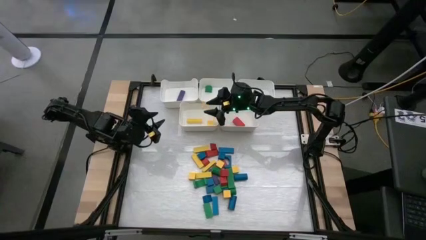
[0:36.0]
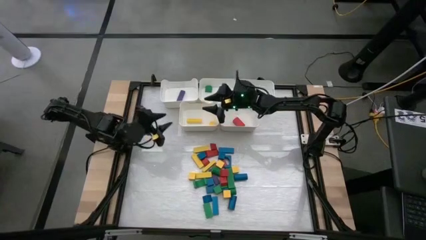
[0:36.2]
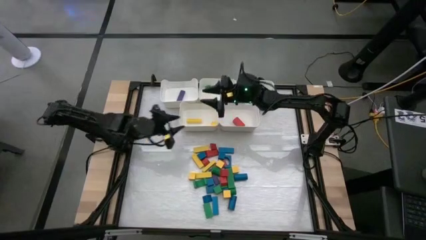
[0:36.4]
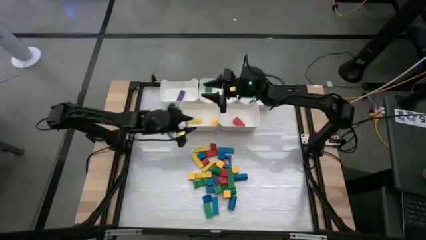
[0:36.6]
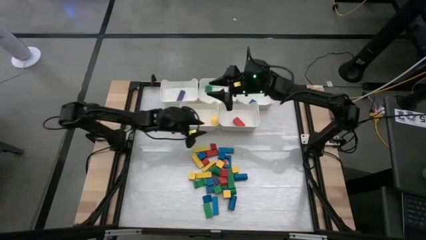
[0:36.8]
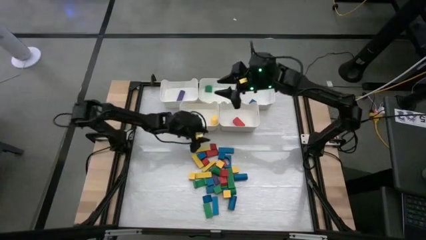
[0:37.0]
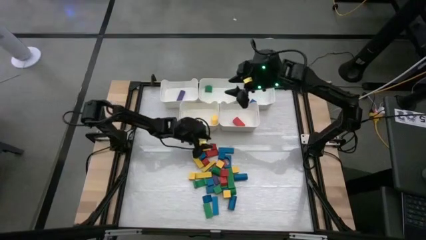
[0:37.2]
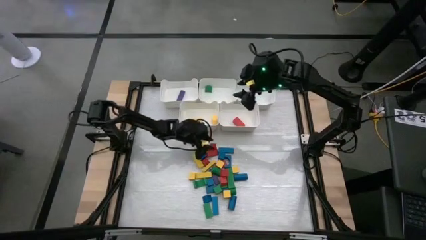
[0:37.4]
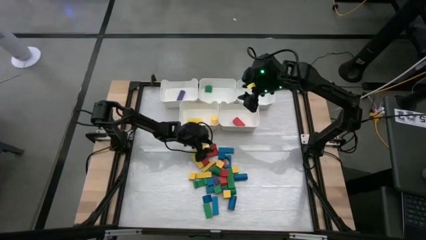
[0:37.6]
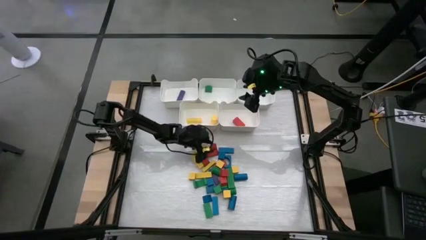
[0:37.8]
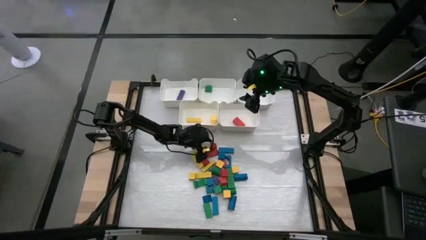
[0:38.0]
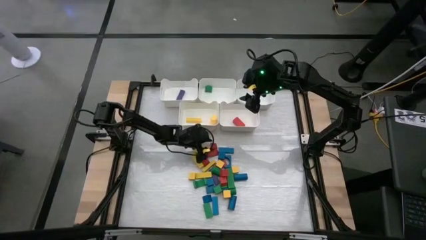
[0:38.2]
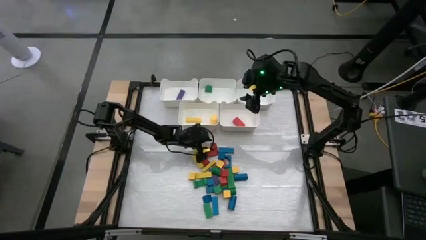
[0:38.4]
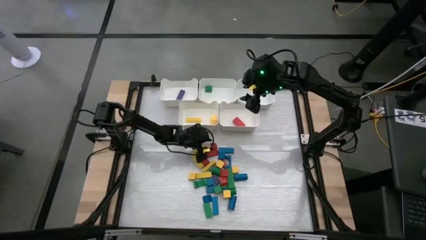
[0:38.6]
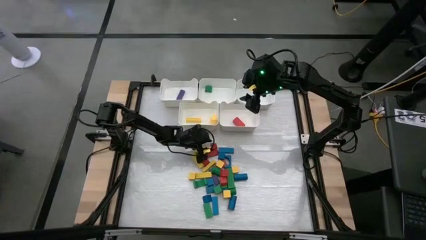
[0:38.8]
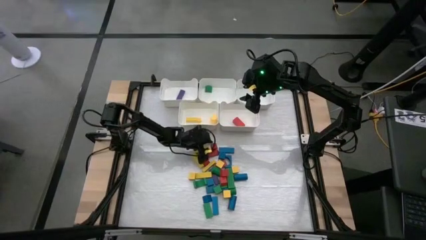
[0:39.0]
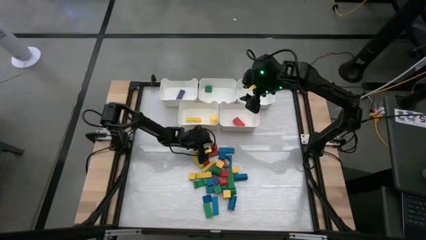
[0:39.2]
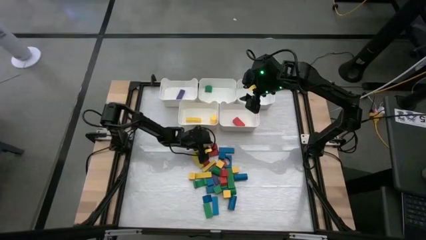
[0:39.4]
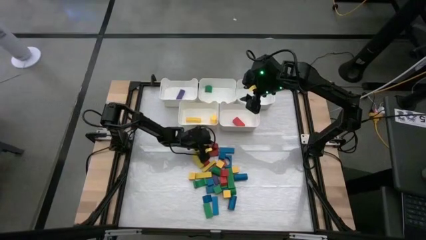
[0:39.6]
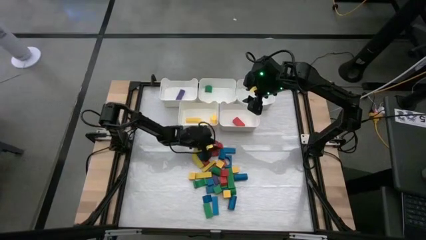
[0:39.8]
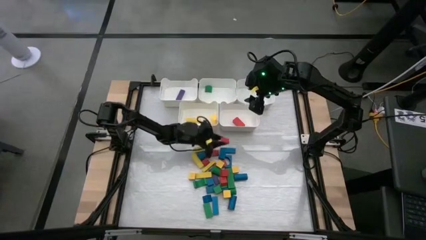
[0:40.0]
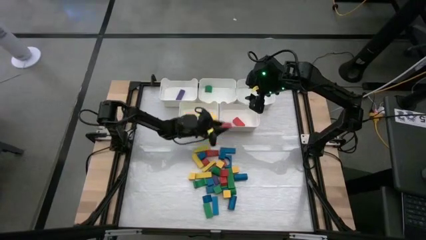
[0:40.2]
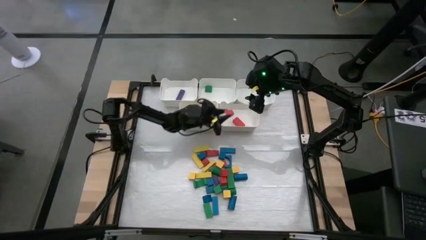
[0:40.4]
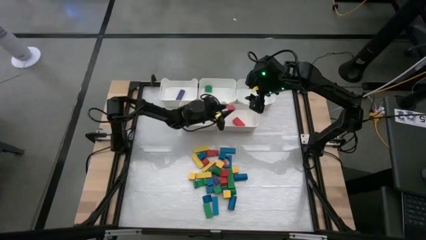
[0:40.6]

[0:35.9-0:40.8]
Task: Sort blocks
Put the red block into the bottom right bin

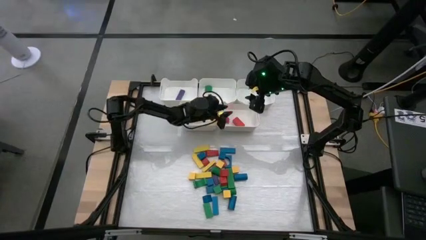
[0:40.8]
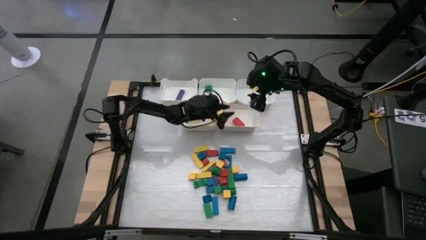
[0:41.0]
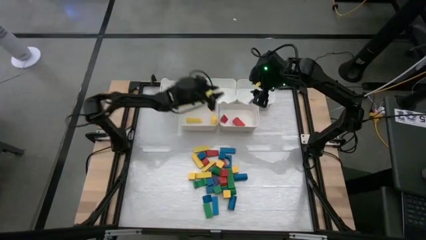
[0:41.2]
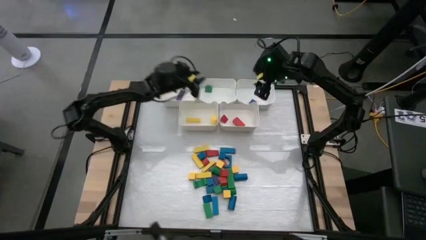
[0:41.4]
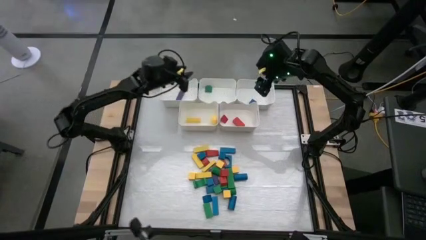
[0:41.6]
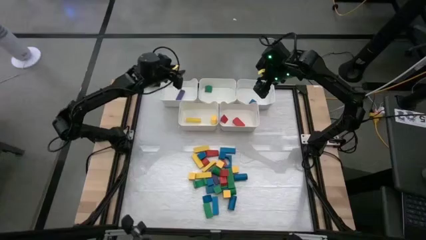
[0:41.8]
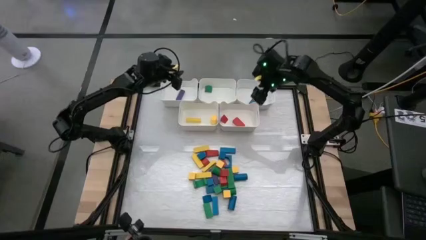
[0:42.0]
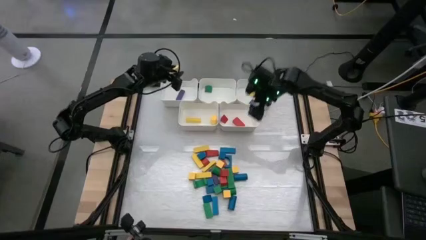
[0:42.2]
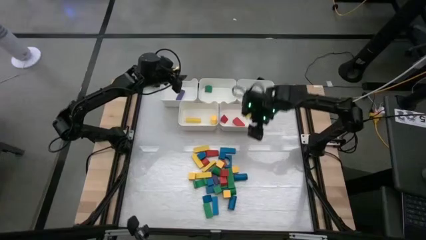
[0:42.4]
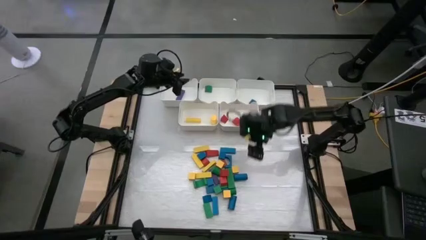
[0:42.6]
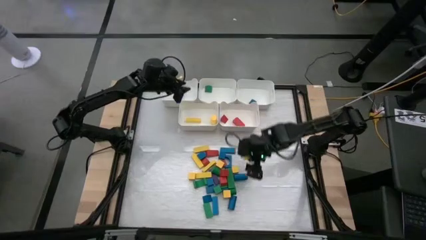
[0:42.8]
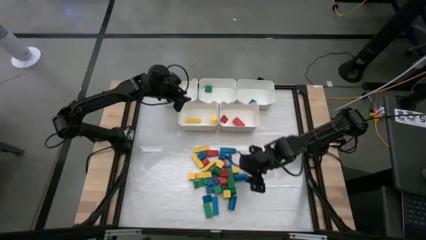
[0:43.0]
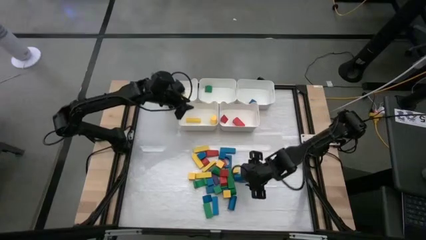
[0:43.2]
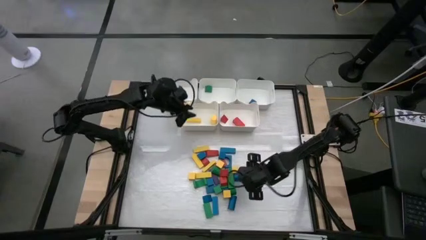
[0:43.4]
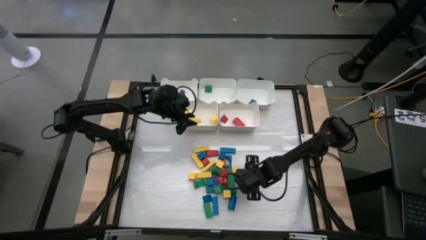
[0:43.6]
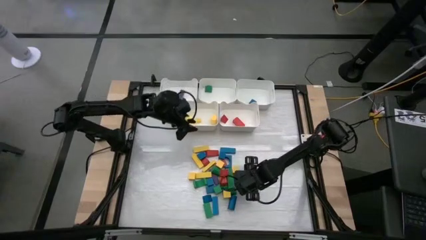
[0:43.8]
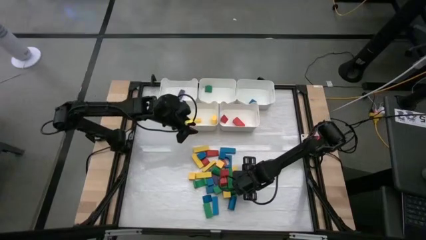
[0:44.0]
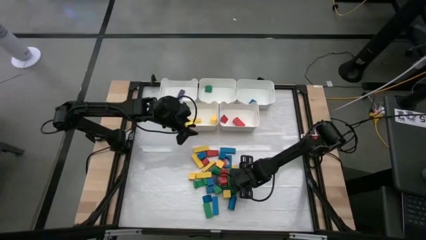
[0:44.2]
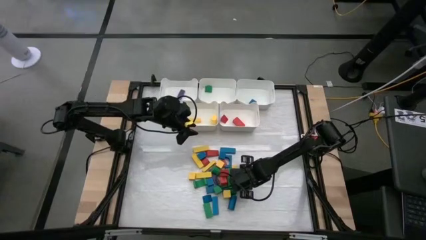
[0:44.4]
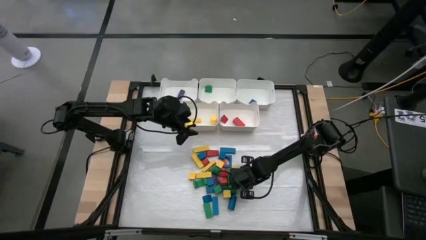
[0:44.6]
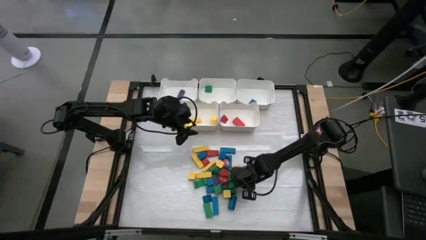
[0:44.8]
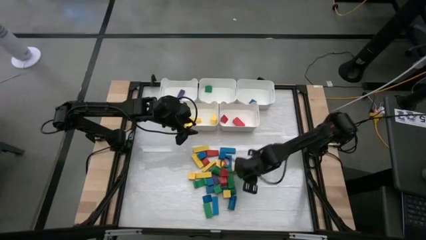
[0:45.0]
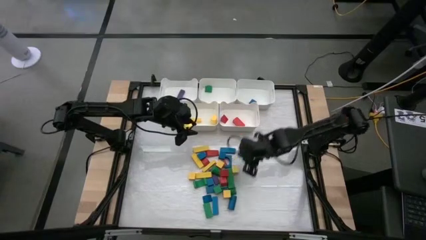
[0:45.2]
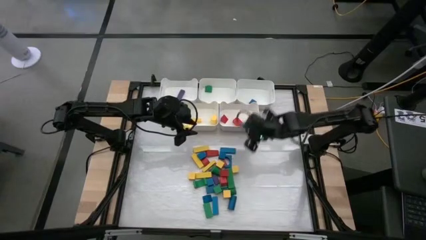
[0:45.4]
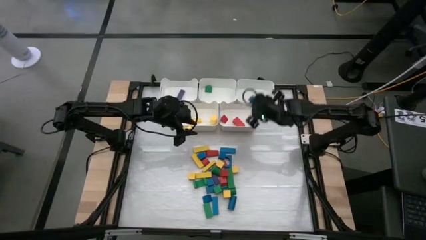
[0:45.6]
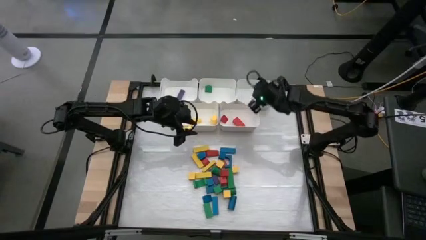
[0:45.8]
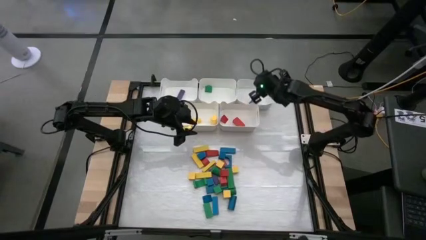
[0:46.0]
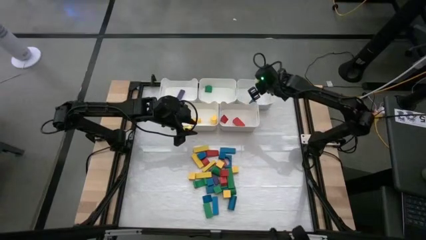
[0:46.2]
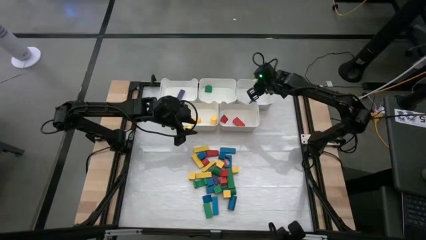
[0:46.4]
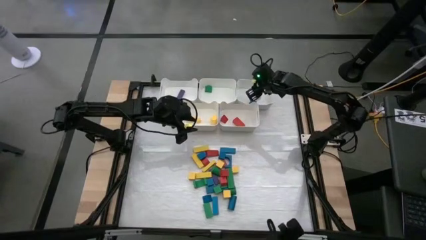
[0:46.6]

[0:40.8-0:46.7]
Put the blue block into the top right bin

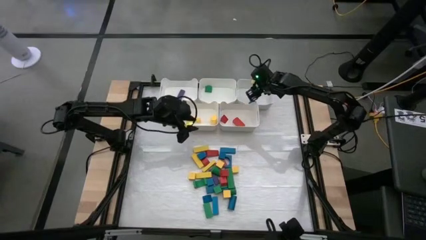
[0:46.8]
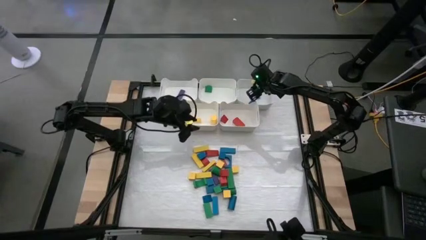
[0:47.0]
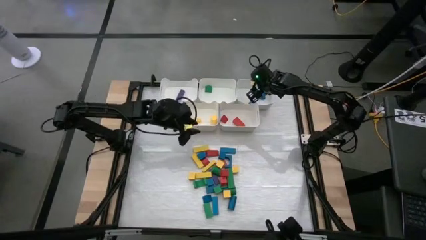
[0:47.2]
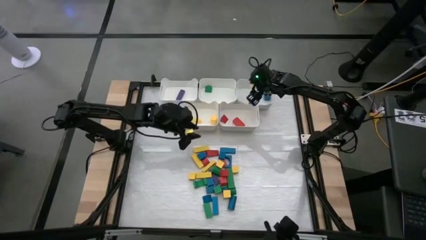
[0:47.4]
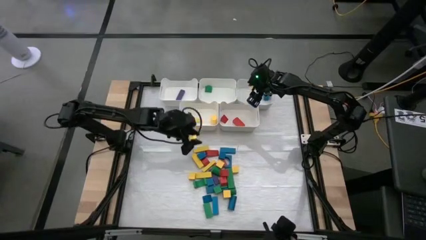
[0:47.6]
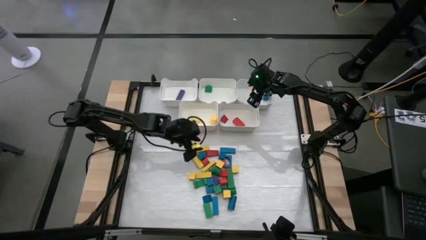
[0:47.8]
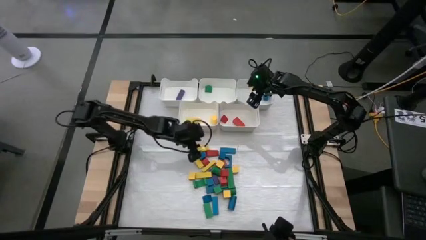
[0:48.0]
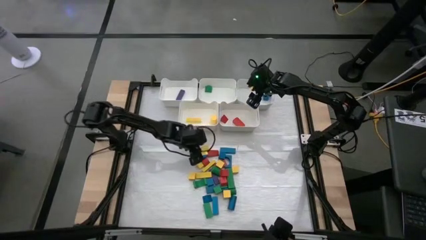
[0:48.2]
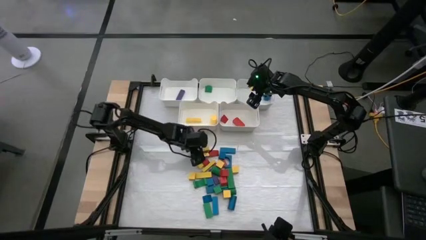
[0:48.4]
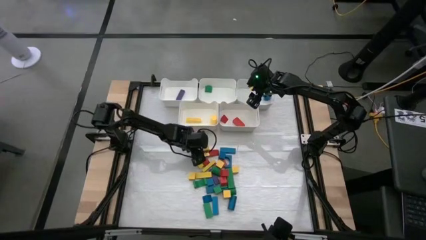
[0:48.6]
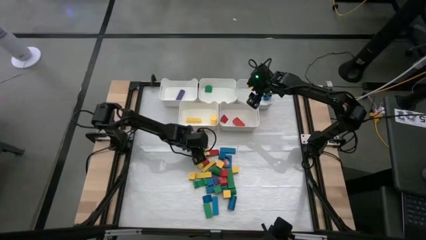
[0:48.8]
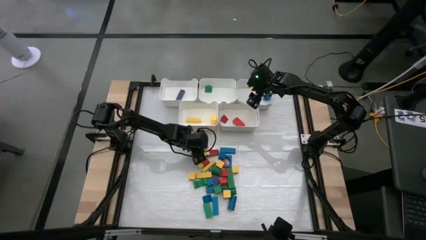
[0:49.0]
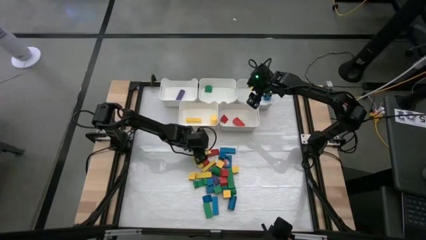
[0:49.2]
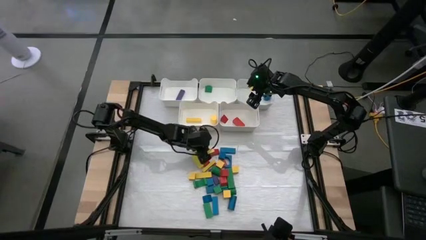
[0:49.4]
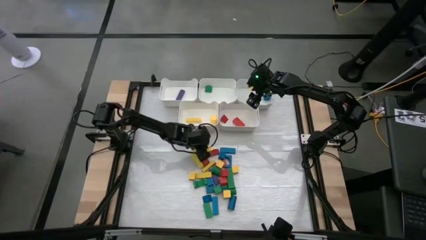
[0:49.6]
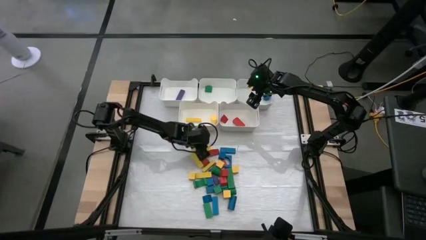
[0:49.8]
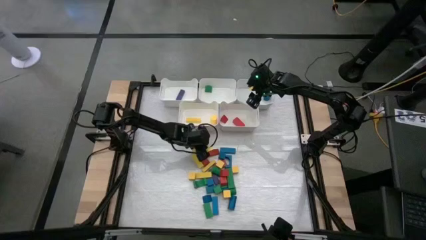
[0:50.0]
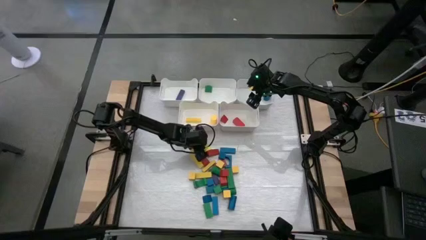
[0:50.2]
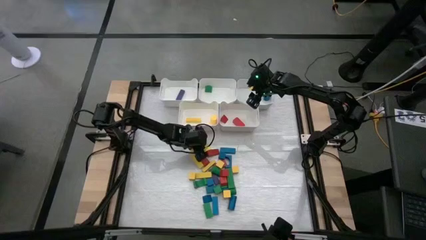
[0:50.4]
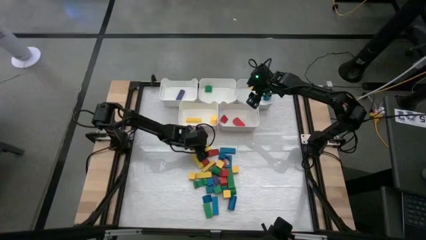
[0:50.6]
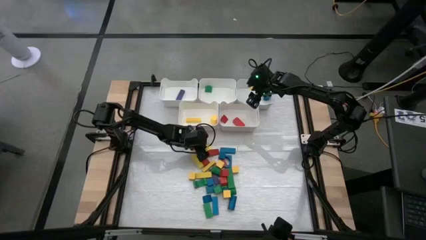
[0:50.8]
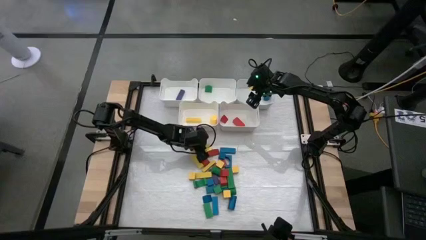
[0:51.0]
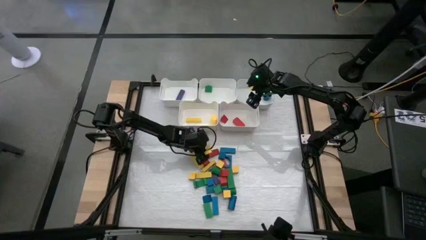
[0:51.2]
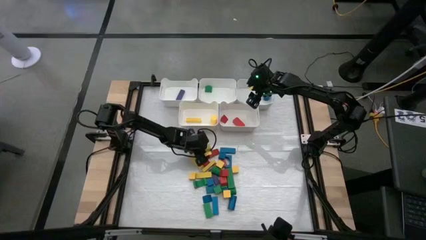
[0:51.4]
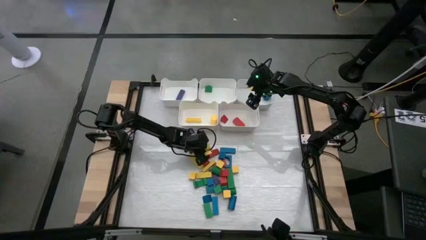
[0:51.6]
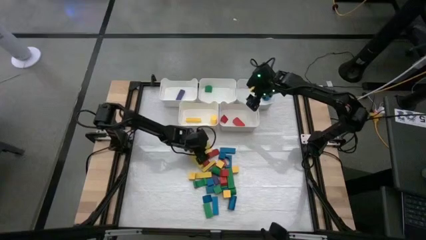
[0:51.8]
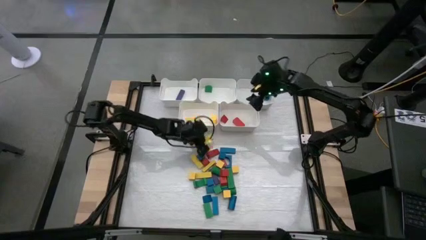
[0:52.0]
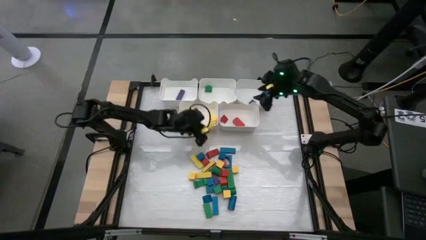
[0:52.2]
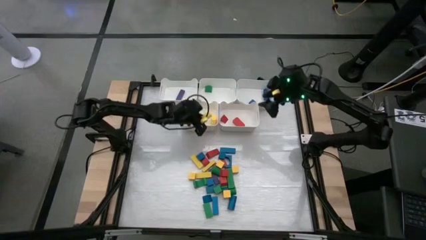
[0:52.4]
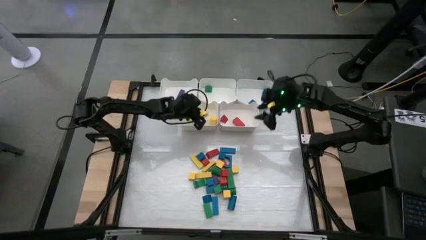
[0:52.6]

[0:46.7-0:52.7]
Put the yellow block into the bottom left bin
